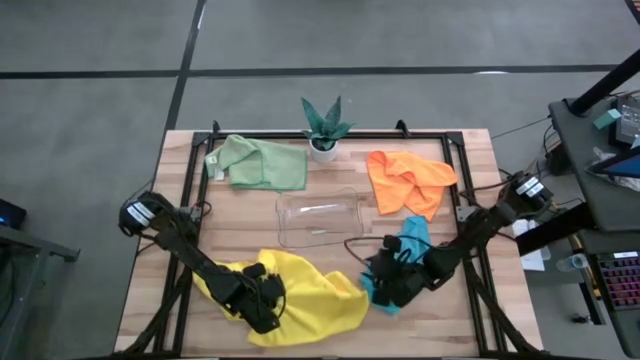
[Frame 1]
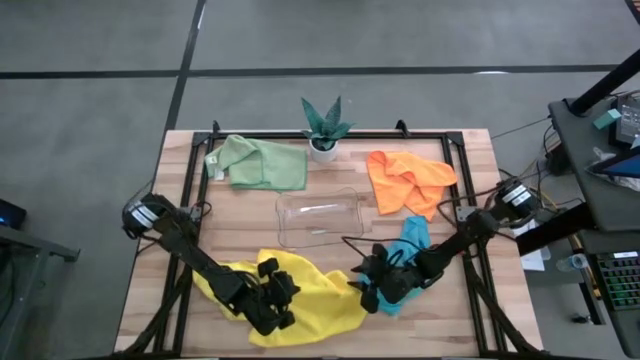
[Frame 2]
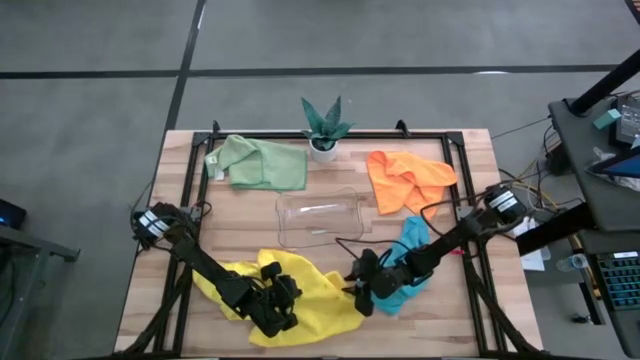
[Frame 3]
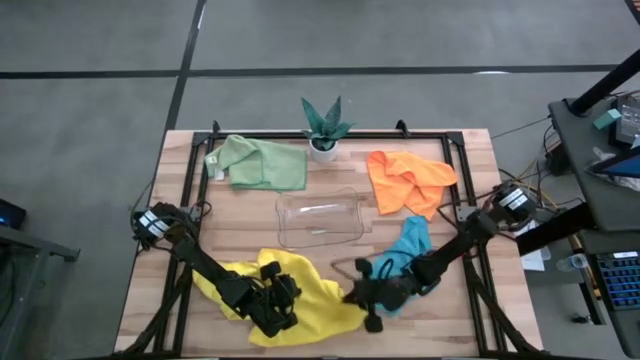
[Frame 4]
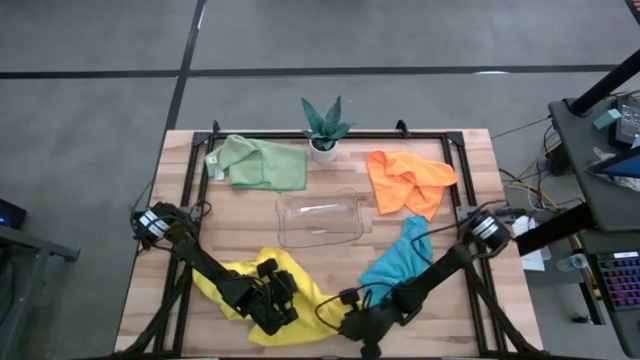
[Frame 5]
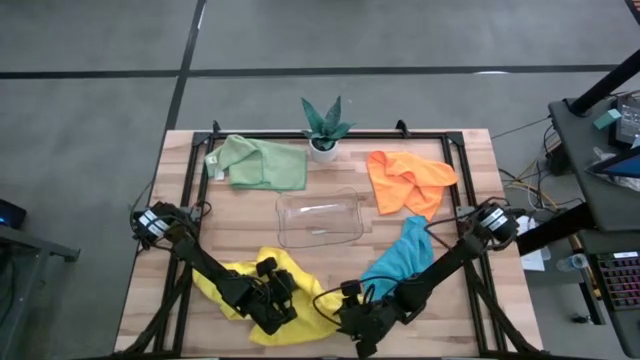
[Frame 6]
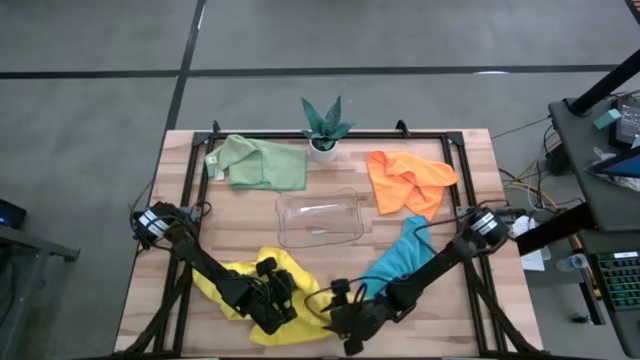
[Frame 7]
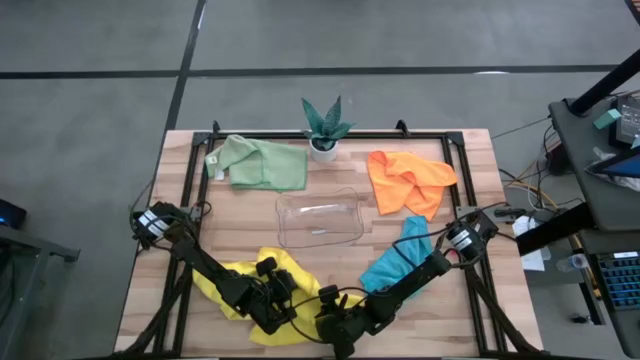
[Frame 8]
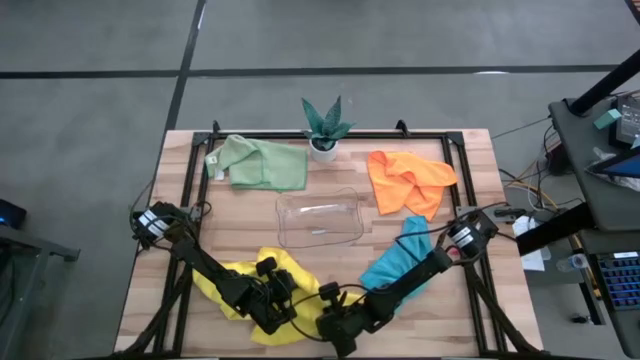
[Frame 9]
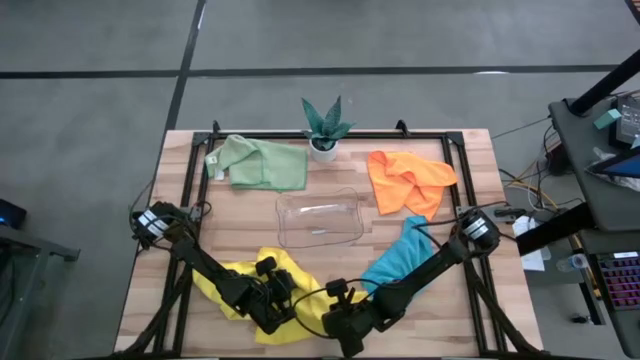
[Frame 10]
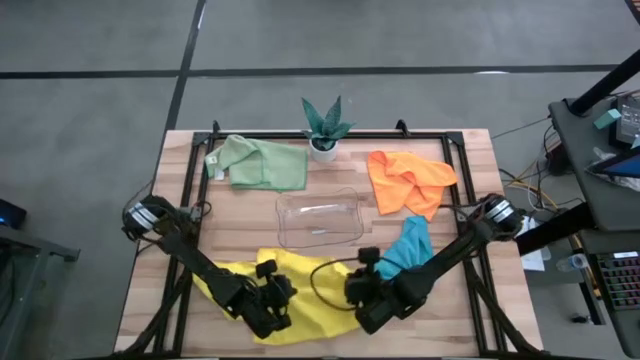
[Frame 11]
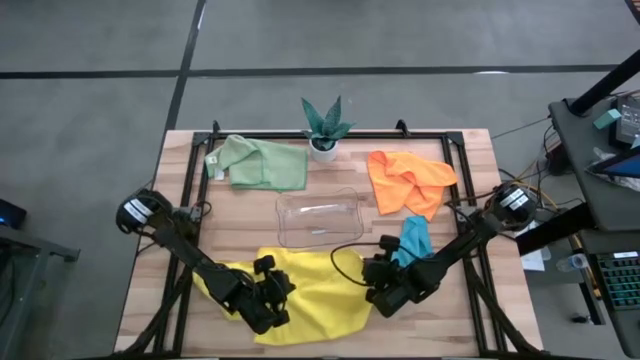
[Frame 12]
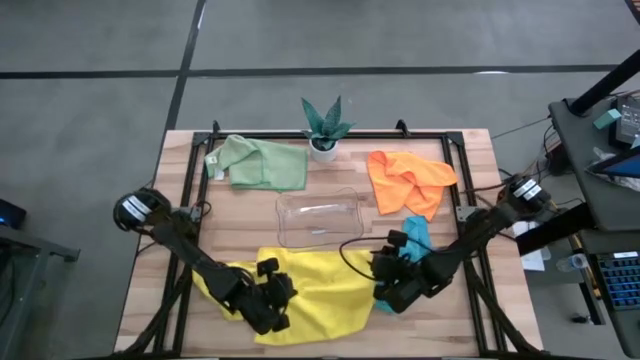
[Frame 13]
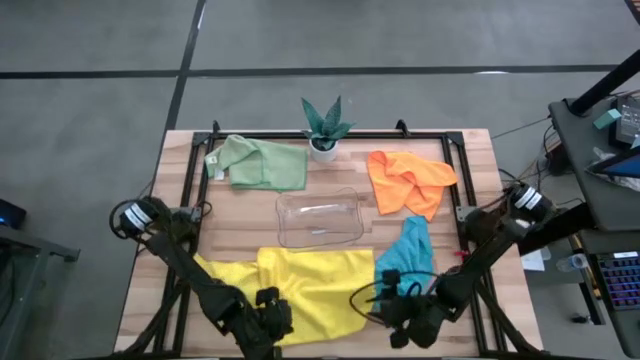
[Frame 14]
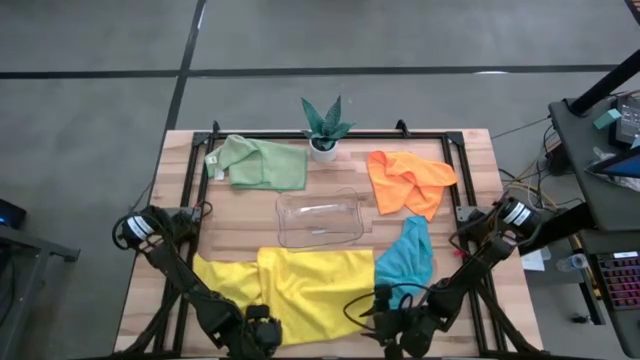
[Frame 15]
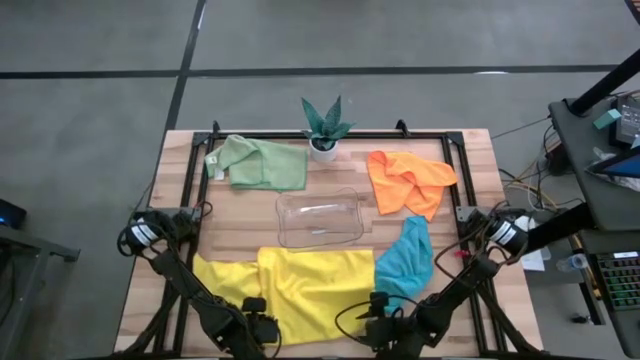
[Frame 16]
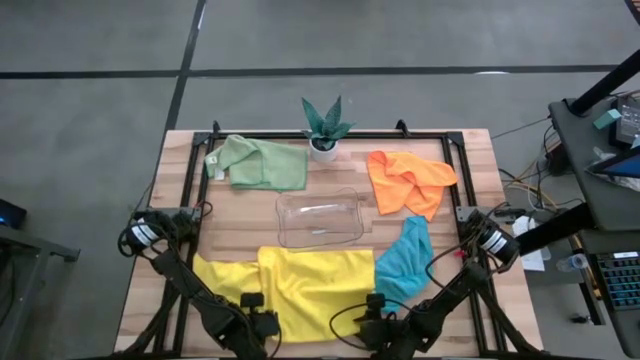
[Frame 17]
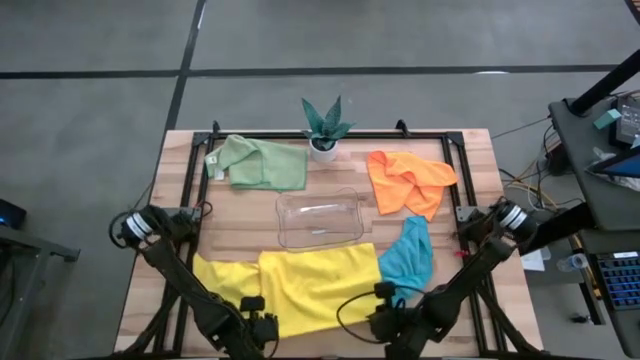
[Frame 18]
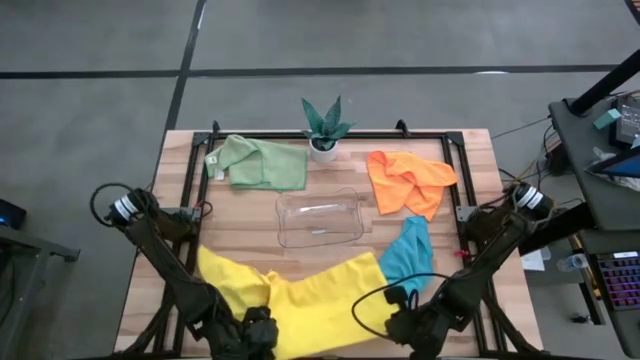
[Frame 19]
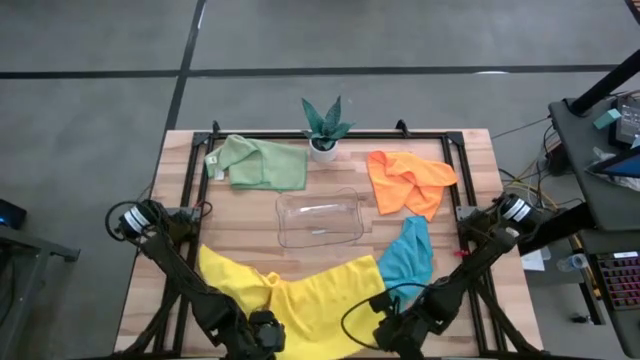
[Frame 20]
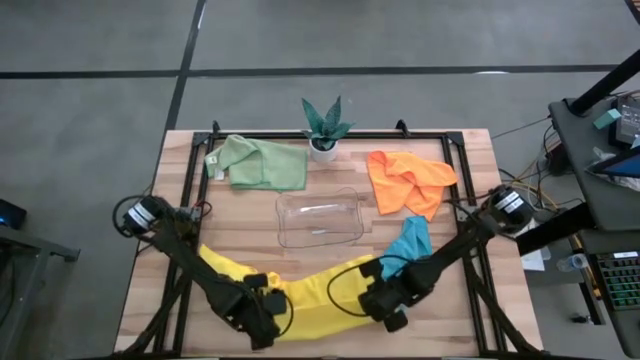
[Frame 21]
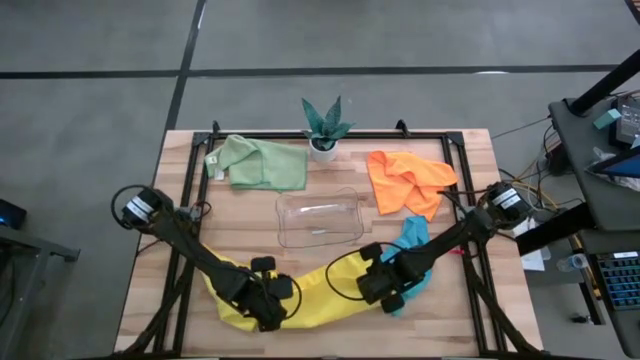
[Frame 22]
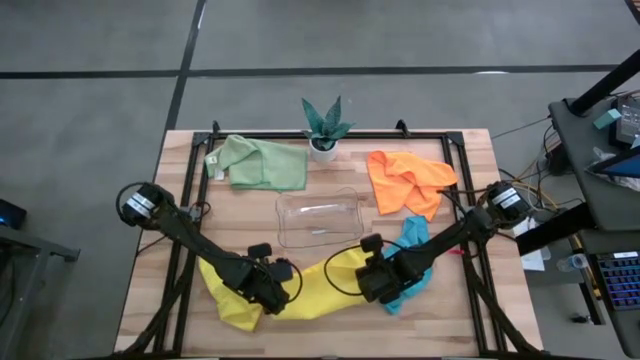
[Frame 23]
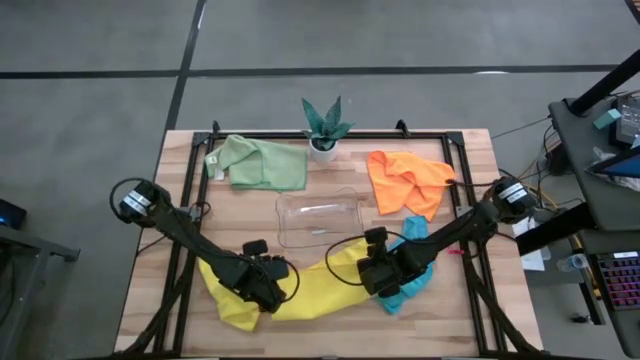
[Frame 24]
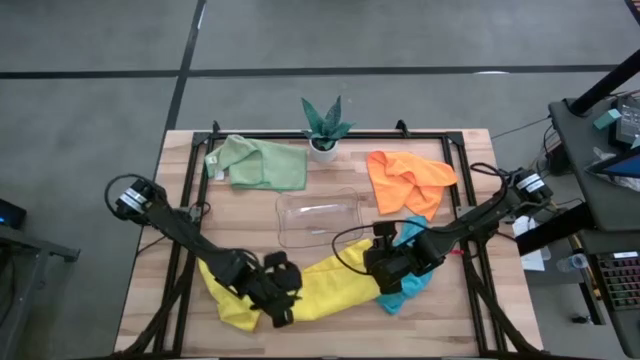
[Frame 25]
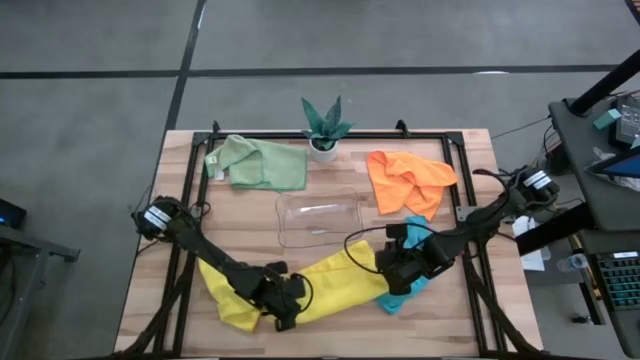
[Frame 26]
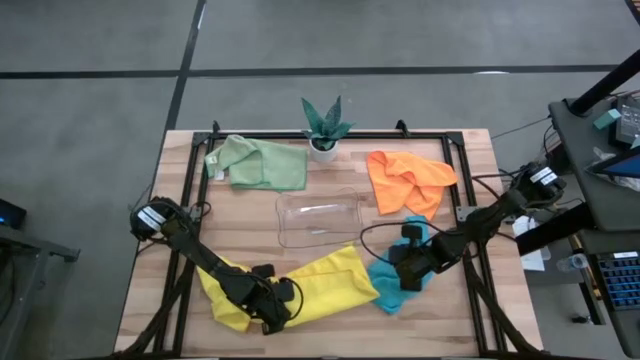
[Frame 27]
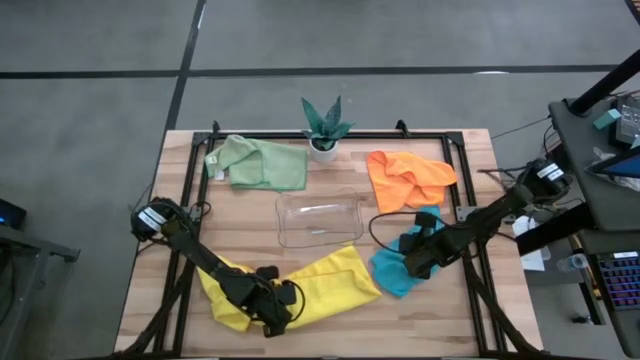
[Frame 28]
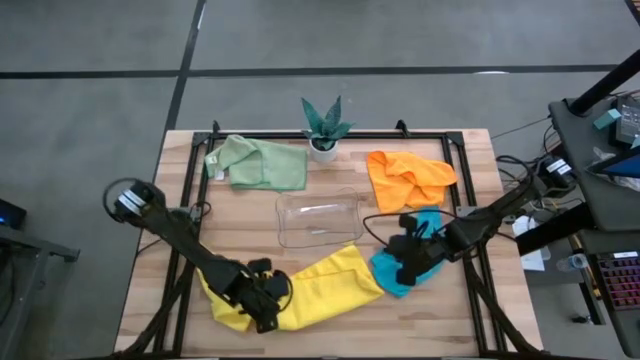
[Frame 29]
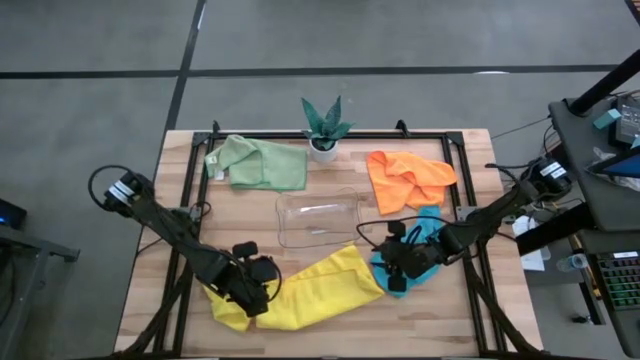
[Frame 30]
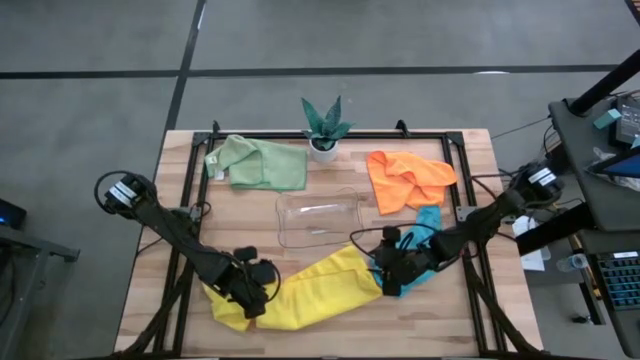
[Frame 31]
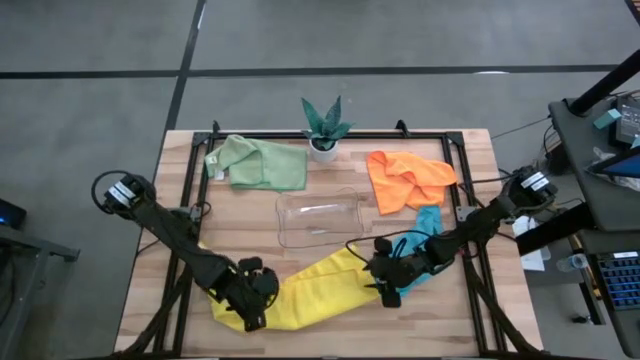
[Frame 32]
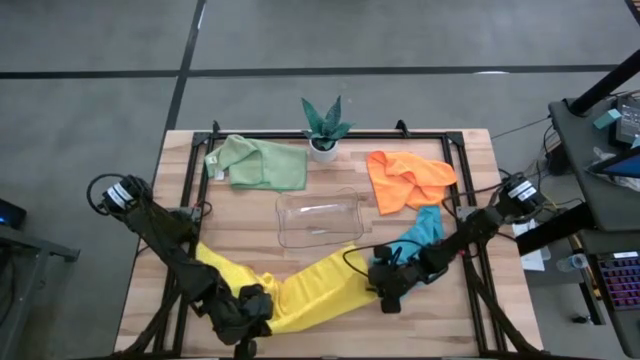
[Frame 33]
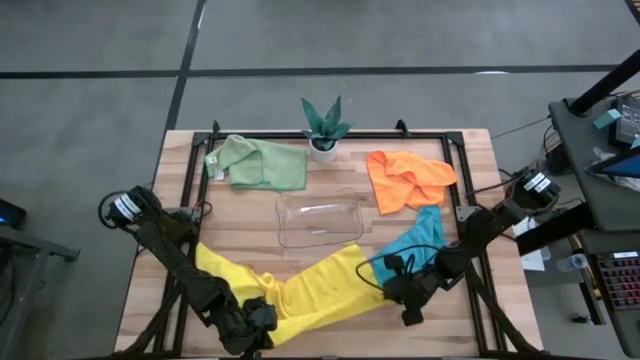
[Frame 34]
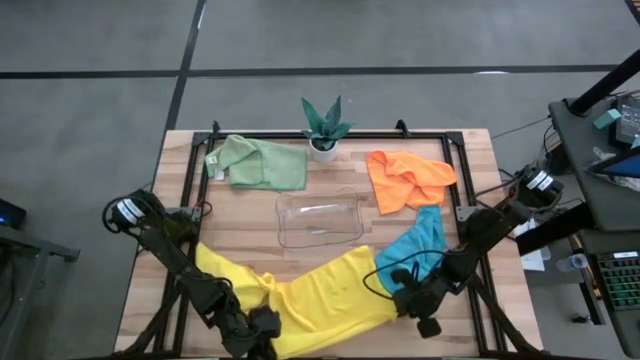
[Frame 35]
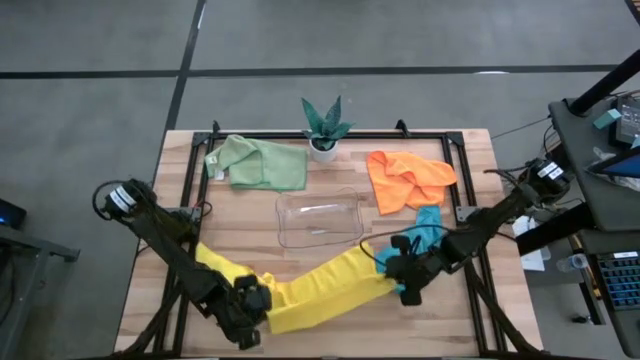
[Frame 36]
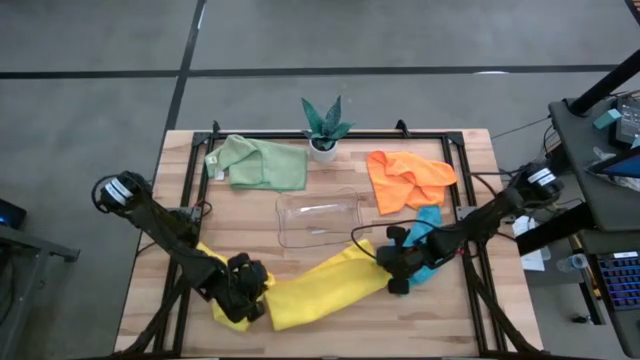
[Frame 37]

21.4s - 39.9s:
Task: Fold microfiber towels
Fold the right yellow microfiber towel
